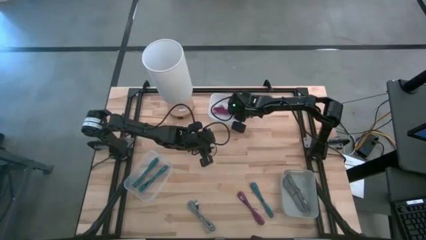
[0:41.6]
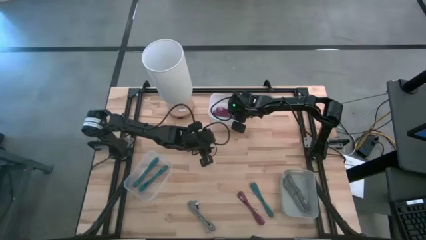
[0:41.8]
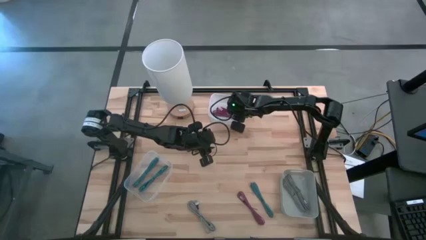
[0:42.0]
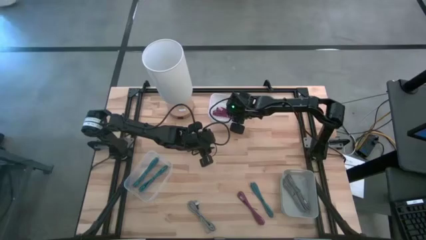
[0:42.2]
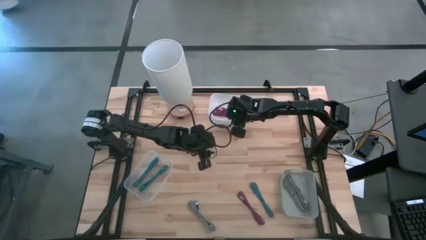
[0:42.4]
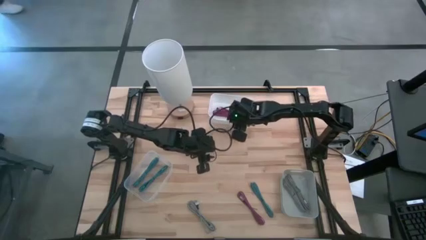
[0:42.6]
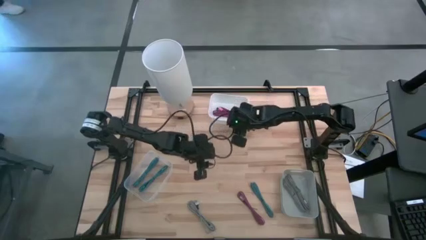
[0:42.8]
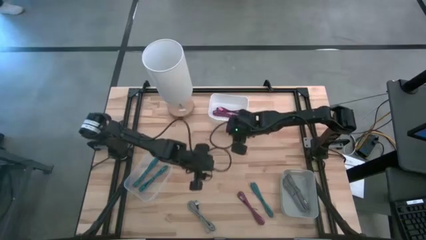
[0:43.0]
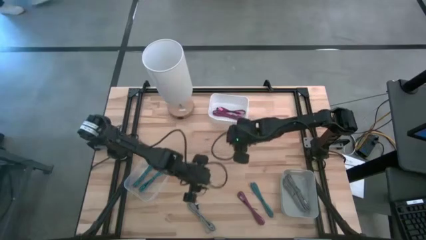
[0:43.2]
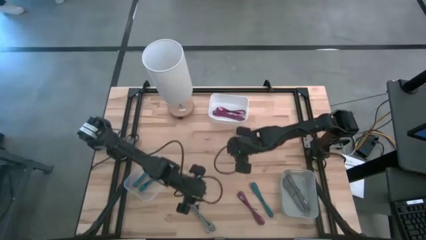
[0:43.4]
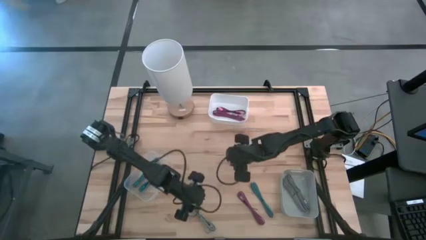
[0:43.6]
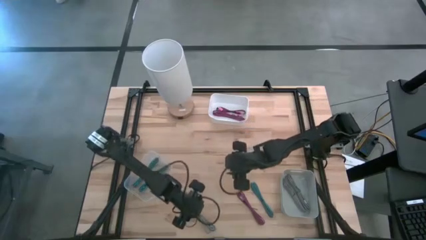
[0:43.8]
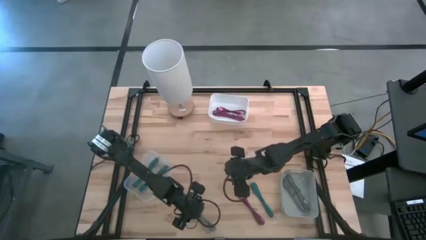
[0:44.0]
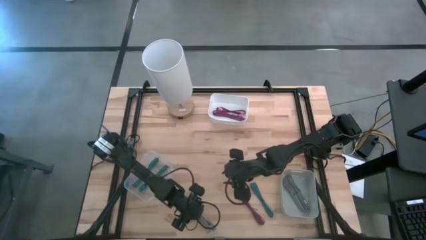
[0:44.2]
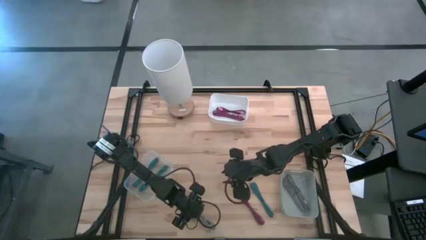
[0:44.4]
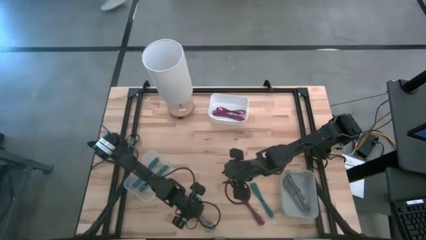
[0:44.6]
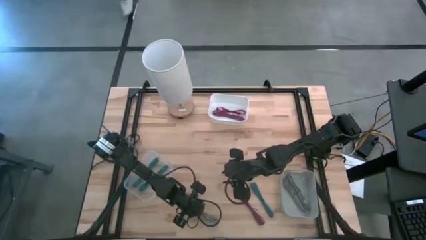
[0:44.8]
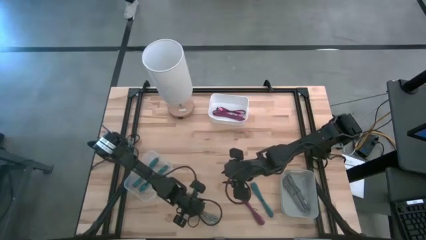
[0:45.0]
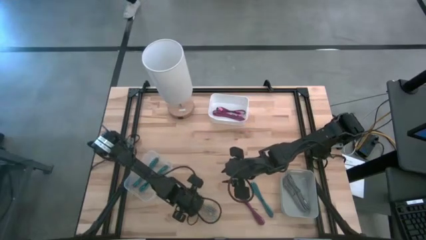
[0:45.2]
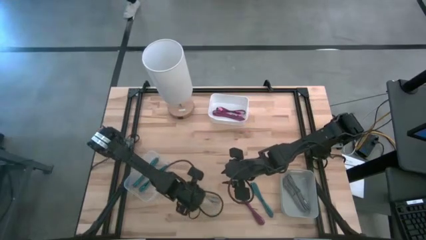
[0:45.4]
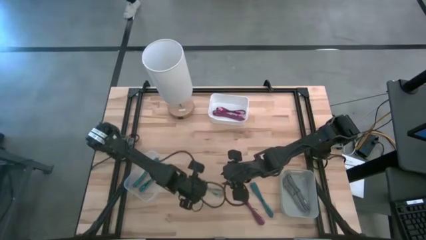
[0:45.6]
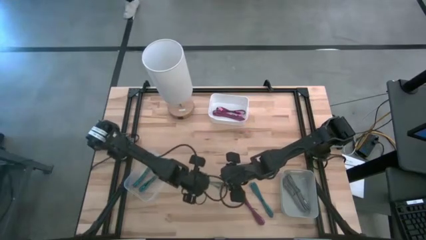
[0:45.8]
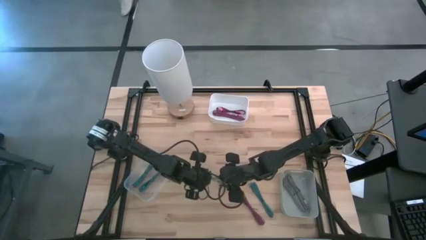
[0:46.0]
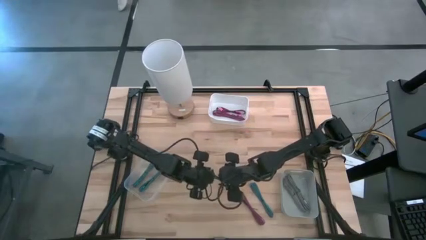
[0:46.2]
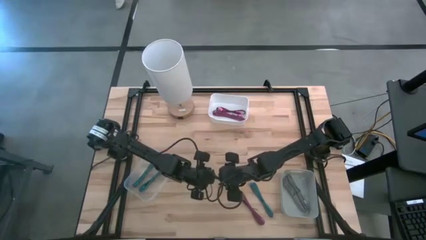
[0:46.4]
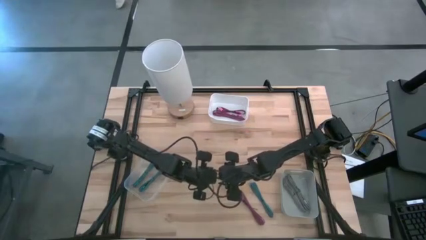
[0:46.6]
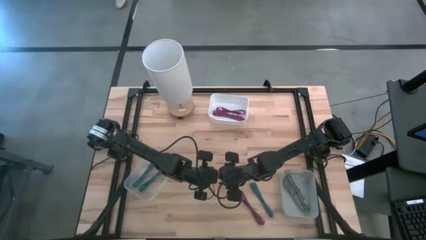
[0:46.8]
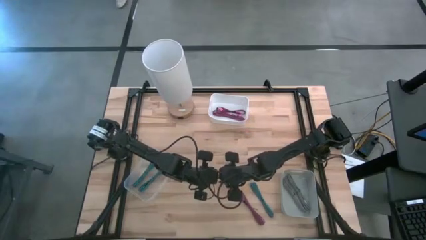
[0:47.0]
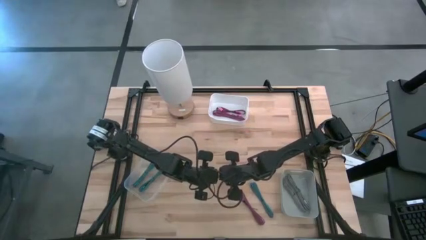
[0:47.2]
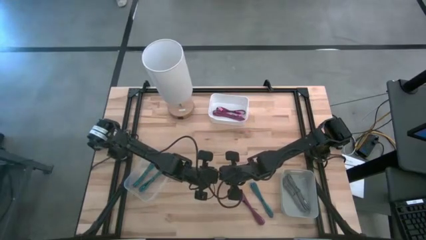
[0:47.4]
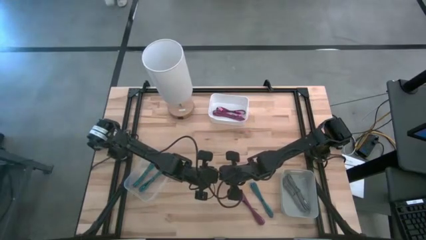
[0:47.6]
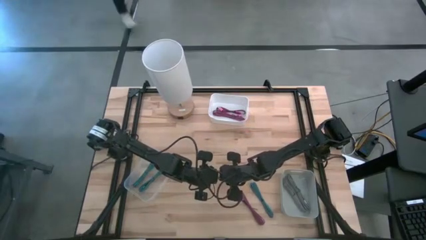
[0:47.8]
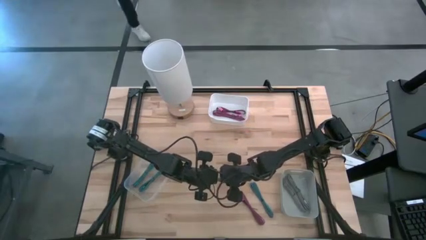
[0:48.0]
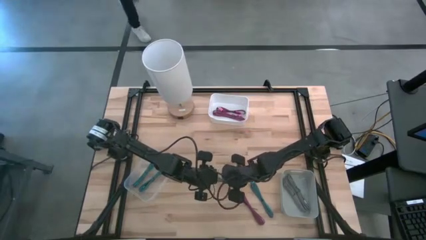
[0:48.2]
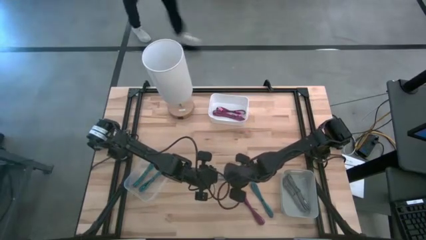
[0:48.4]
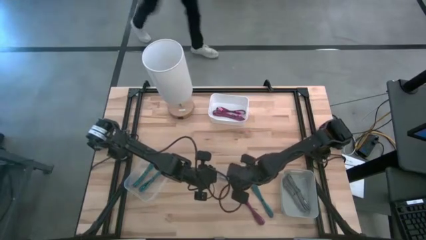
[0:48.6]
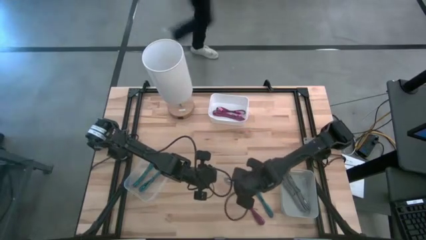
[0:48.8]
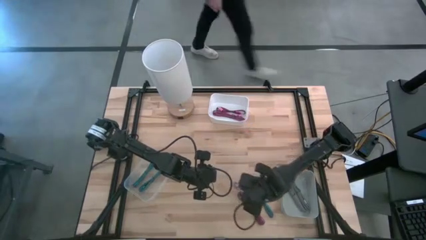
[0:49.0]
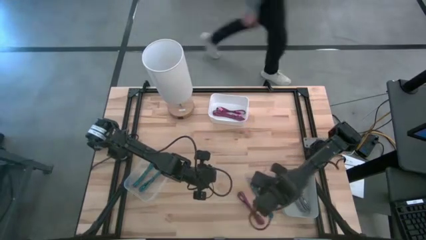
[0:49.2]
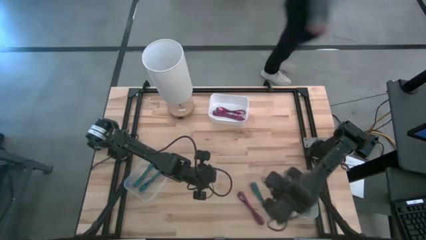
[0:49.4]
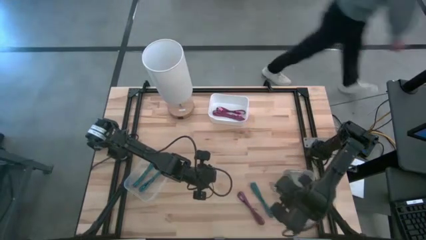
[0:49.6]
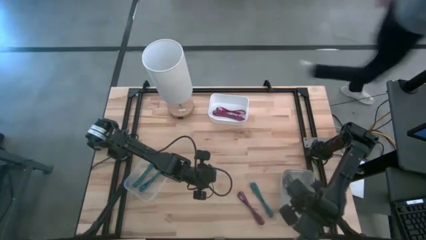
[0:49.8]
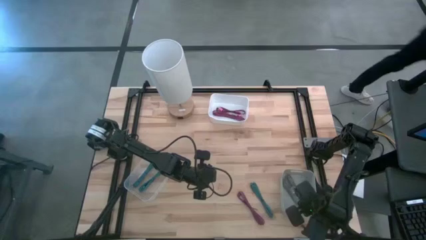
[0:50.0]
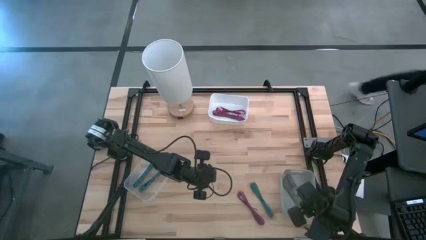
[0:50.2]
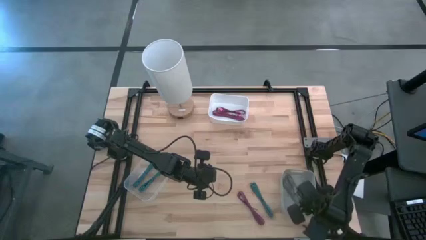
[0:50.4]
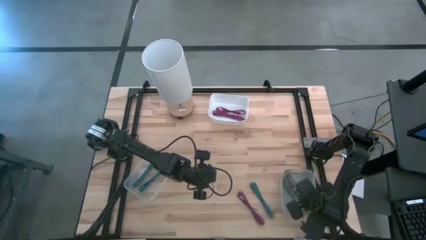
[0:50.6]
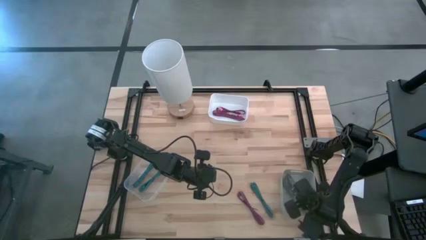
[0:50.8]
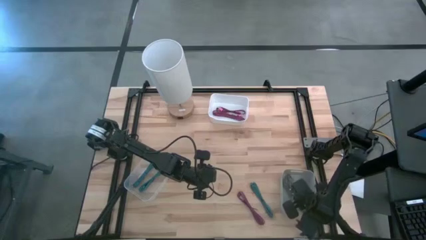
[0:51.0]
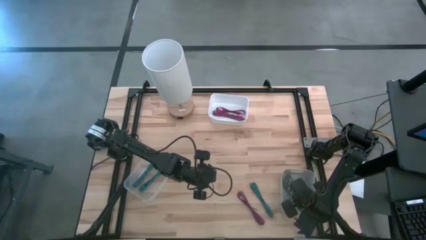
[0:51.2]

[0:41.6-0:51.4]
Task: Pick & Place USB Port
Put the white charger cable into the gray bin

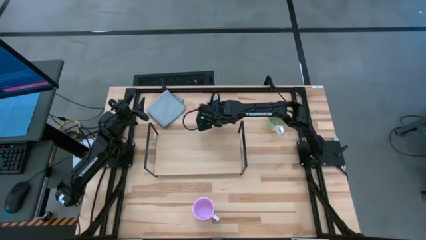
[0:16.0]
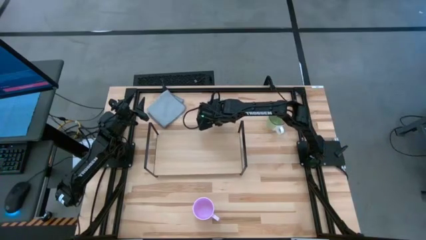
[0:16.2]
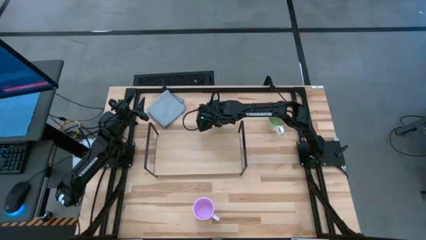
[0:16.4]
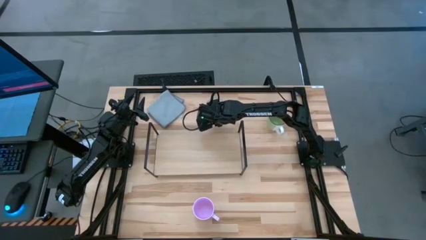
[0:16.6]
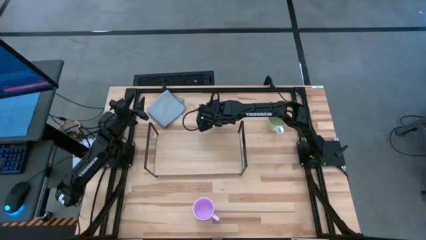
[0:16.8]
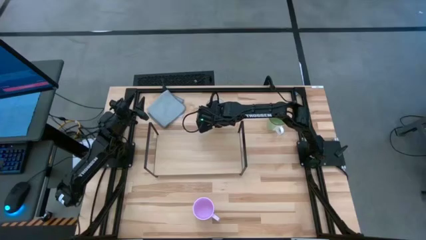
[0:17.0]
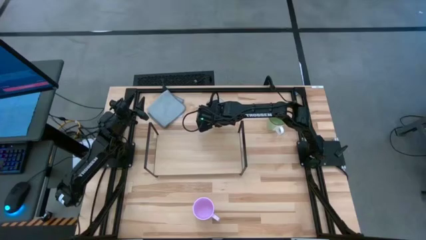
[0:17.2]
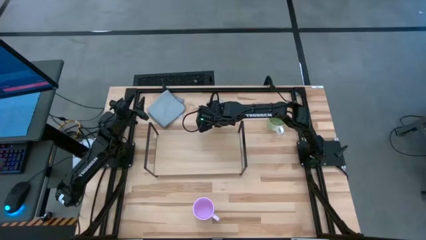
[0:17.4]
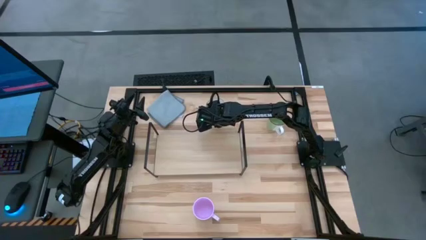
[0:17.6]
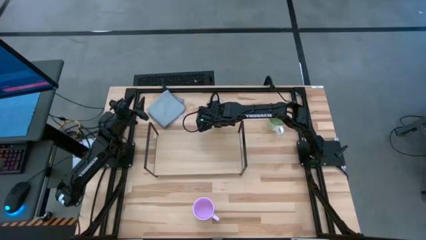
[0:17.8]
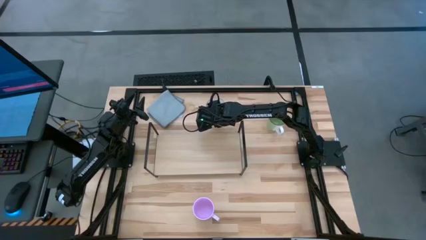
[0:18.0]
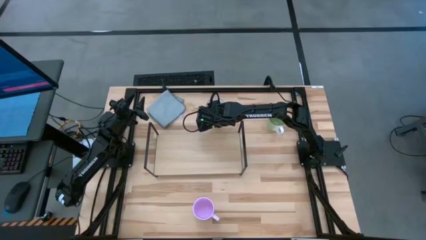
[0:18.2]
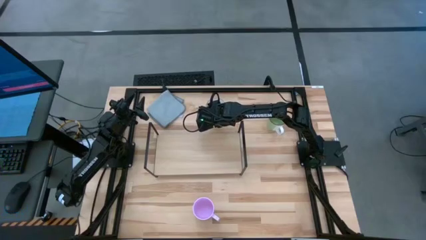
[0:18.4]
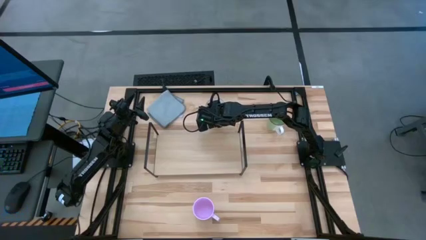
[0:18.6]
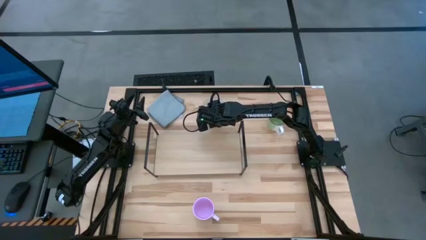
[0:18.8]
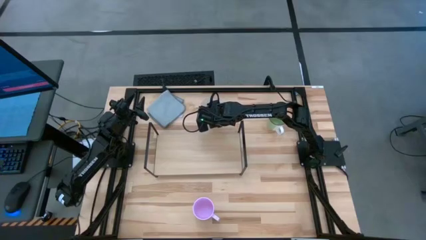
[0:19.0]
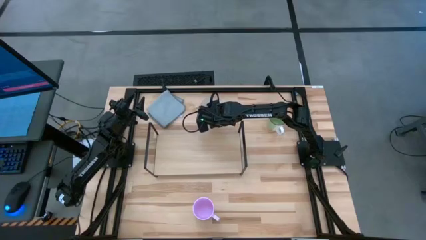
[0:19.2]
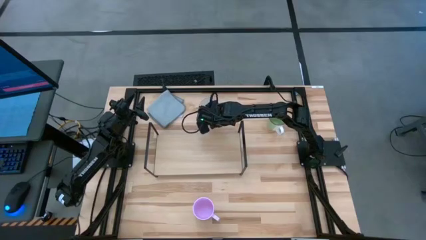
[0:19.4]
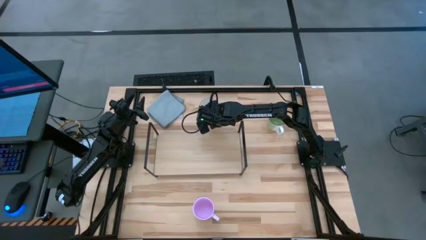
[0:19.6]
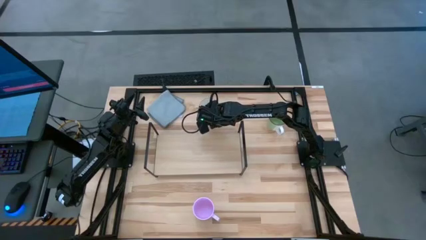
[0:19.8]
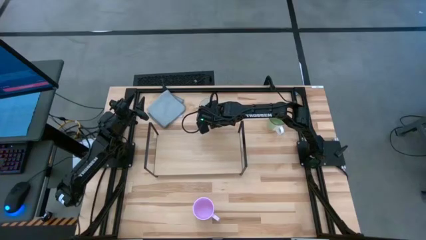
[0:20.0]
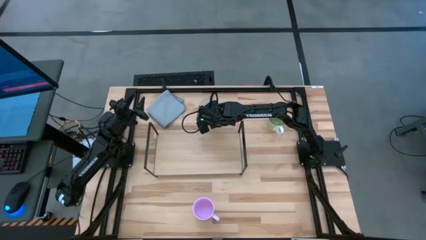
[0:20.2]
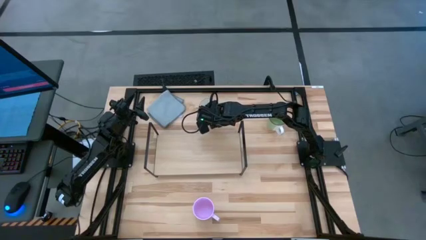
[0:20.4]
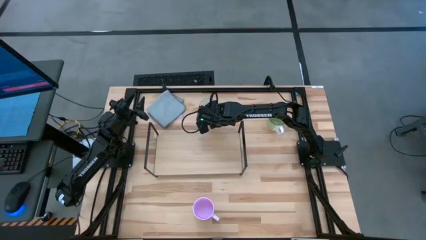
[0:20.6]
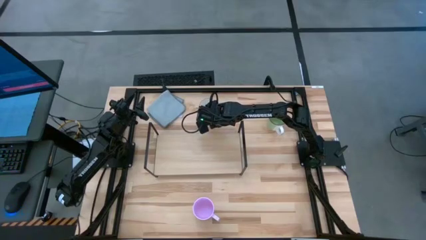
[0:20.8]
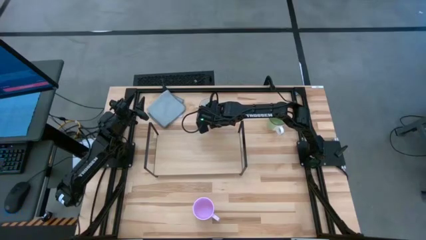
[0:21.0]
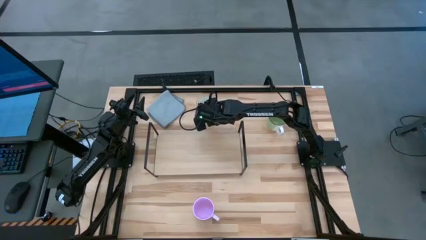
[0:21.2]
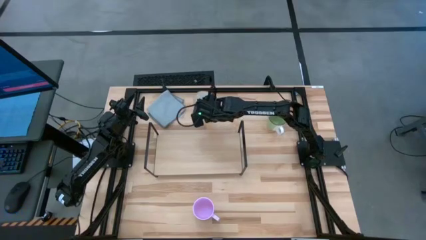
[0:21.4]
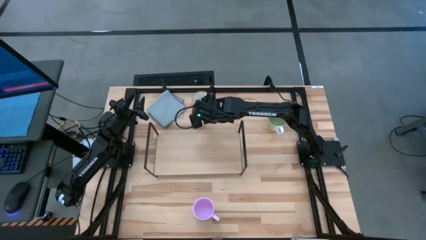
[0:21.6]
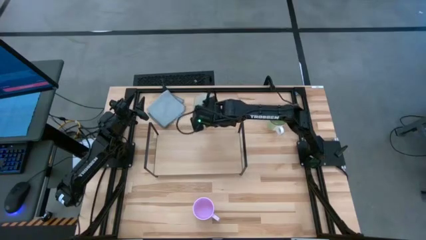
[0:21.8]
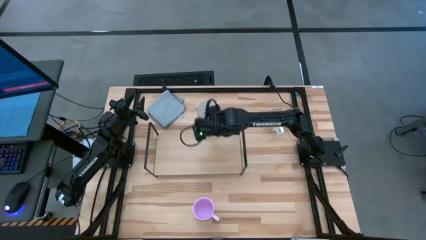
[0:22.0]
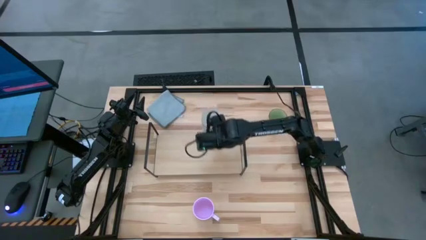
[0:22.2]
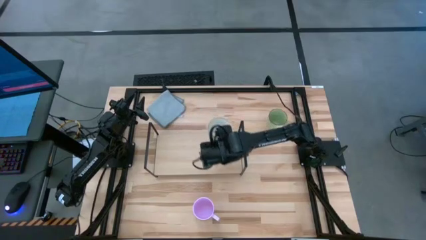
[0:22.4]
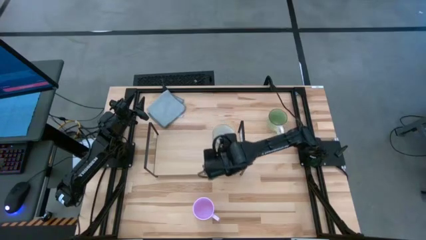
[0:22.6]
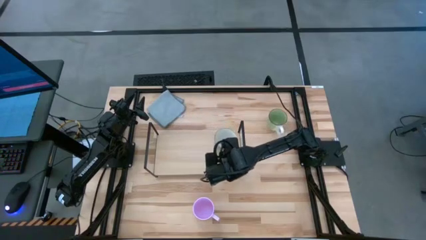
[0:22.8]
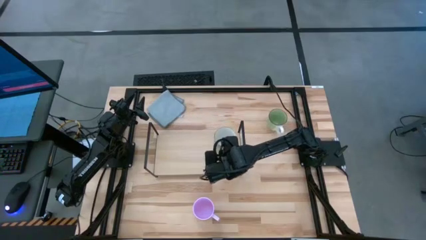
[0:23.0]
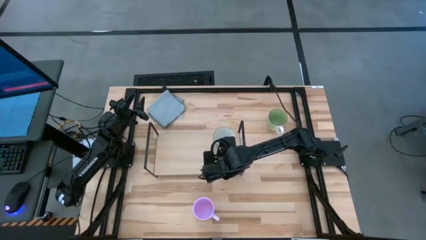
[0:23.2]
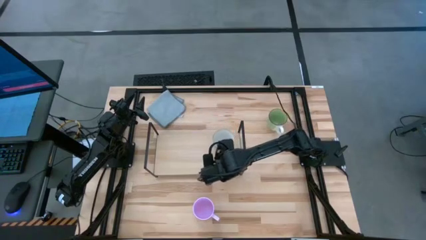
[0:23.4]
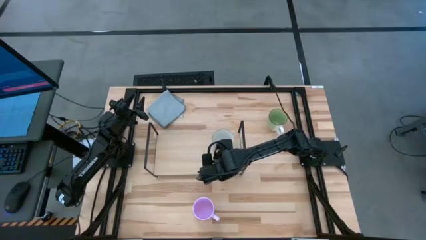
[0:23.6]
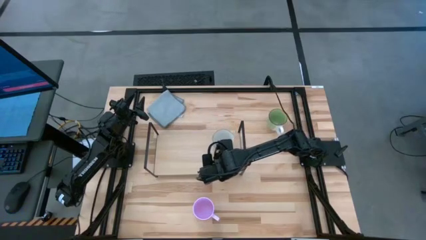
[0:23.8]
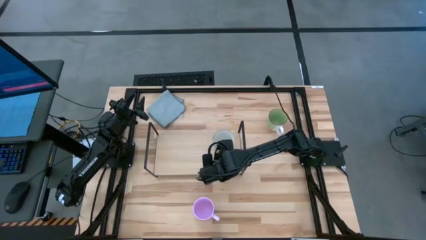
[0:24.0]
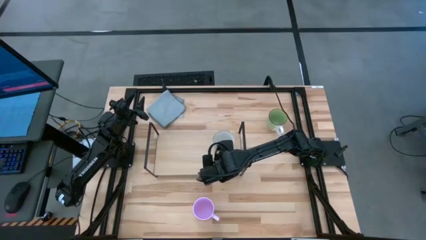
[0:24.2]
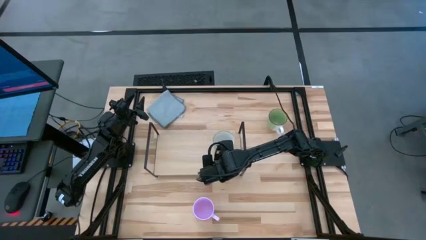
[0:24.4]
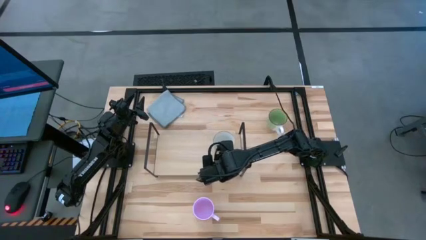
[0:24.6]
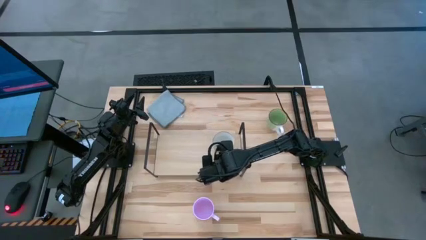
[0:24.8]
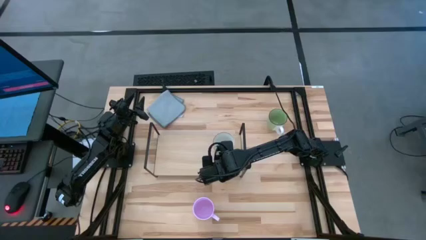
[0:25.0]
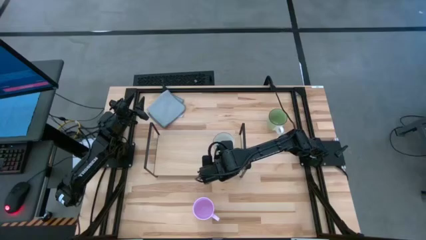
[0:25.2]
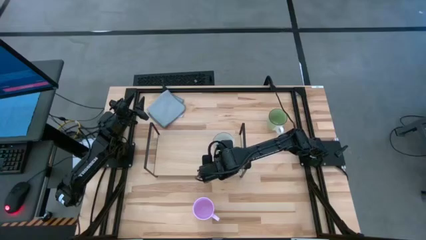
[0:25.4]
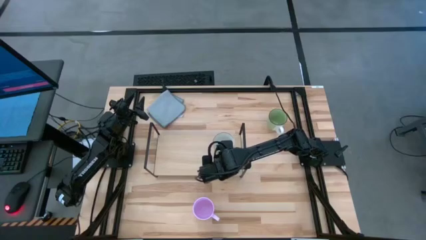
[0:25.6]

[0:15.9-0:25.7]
Task: Stack small to large cups/mugs on shelf
Put the light green mug on the shelf
